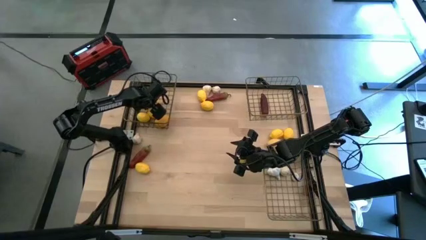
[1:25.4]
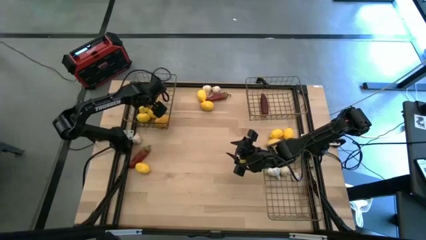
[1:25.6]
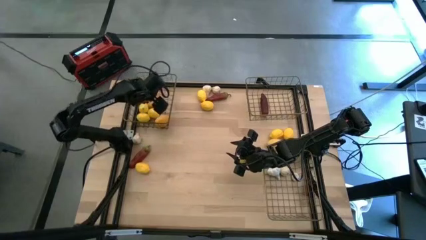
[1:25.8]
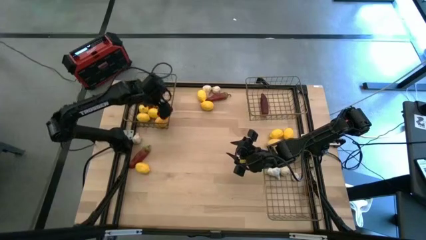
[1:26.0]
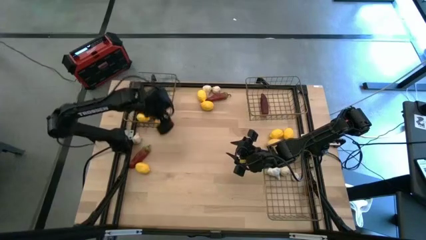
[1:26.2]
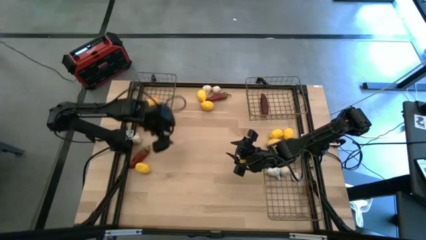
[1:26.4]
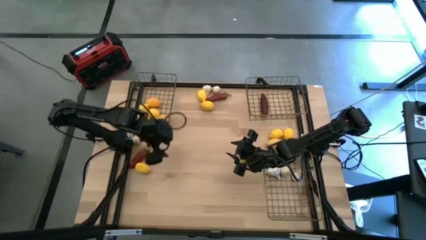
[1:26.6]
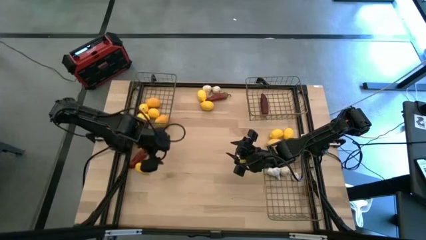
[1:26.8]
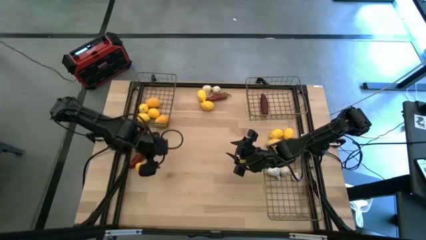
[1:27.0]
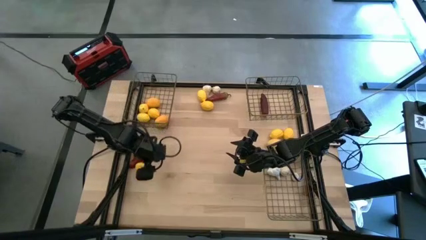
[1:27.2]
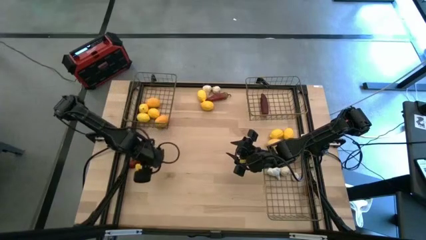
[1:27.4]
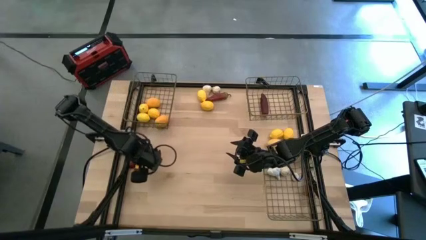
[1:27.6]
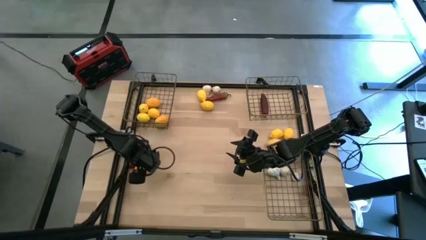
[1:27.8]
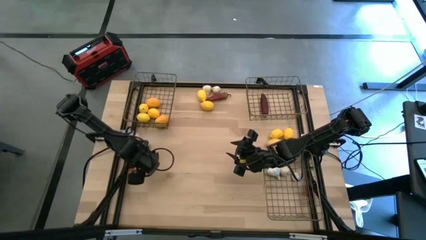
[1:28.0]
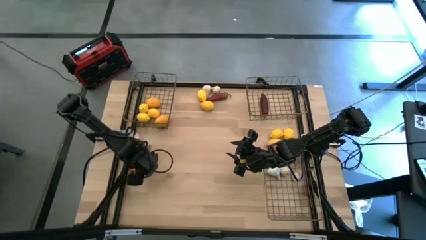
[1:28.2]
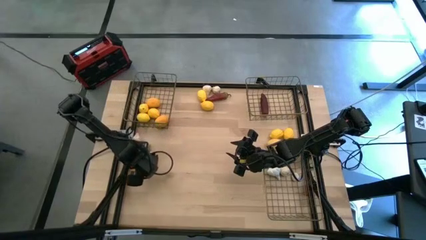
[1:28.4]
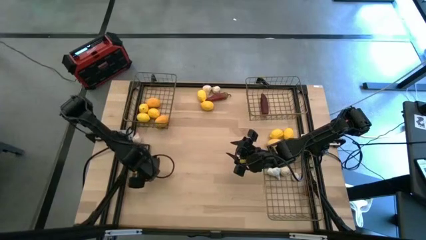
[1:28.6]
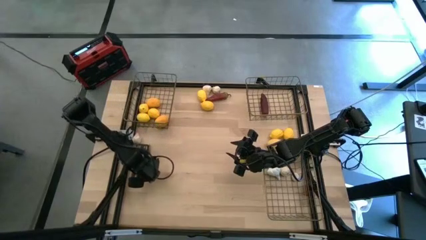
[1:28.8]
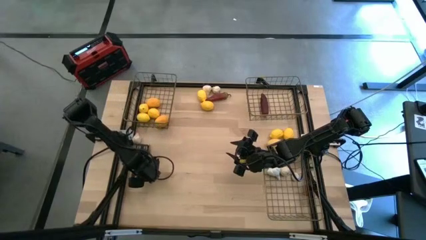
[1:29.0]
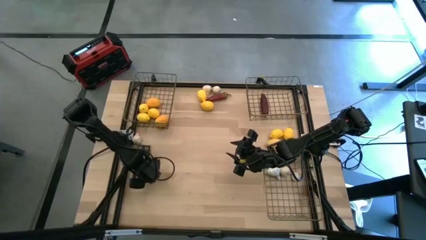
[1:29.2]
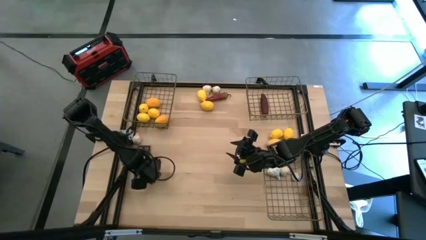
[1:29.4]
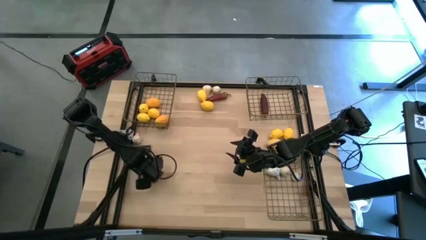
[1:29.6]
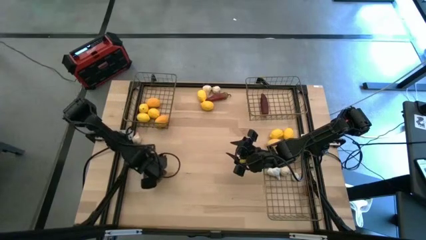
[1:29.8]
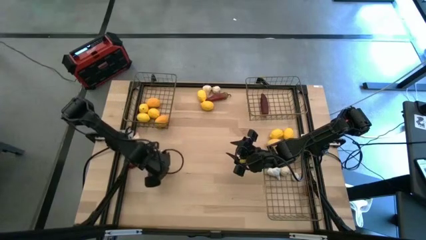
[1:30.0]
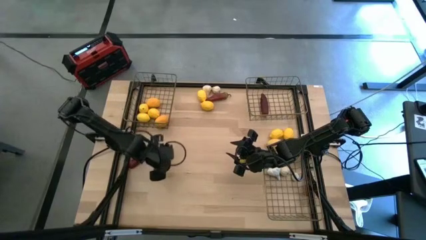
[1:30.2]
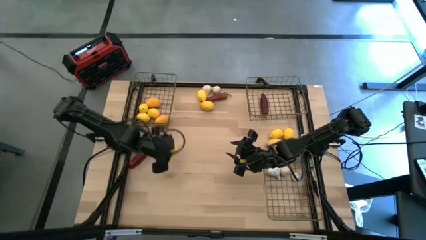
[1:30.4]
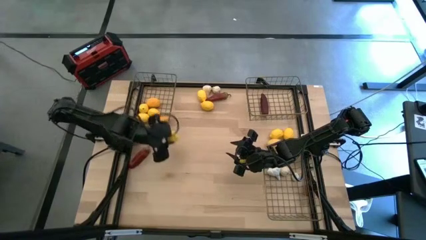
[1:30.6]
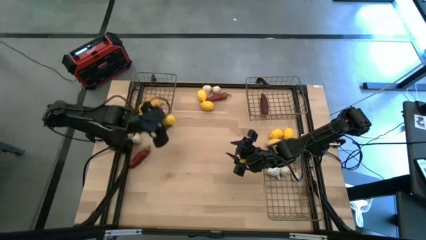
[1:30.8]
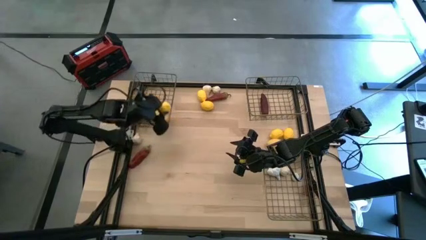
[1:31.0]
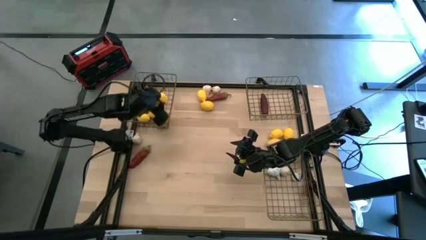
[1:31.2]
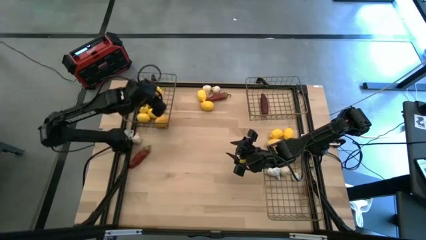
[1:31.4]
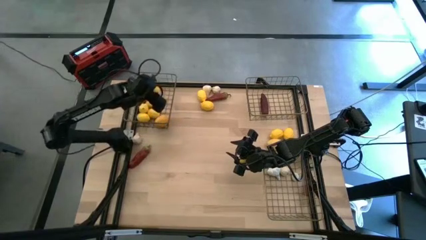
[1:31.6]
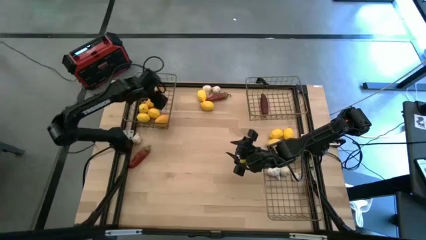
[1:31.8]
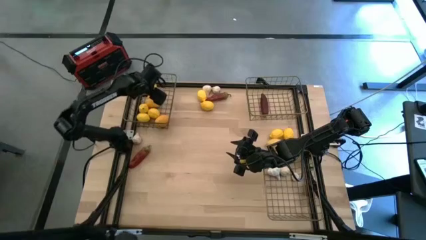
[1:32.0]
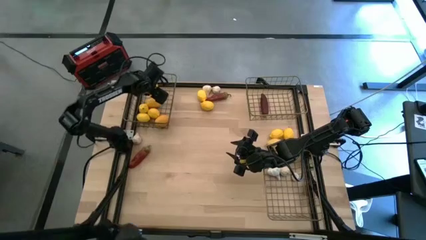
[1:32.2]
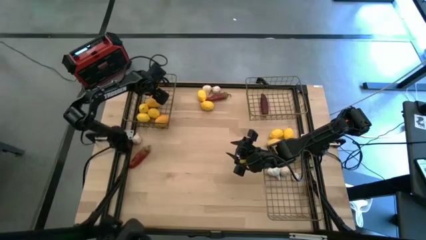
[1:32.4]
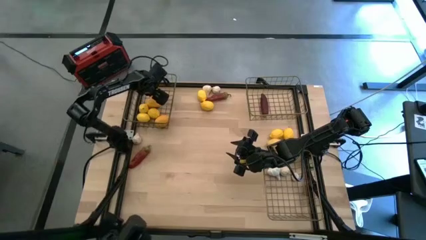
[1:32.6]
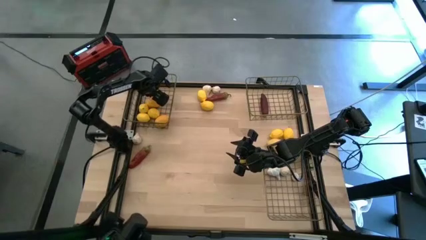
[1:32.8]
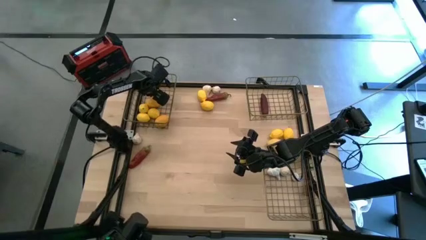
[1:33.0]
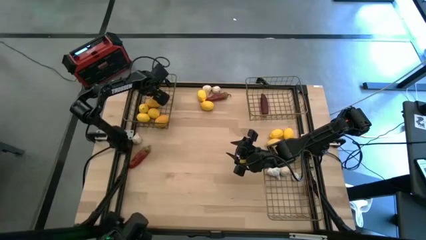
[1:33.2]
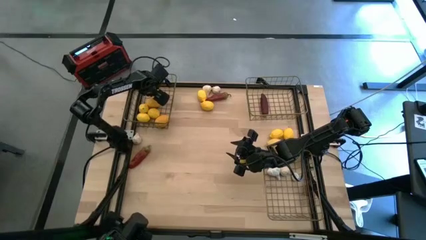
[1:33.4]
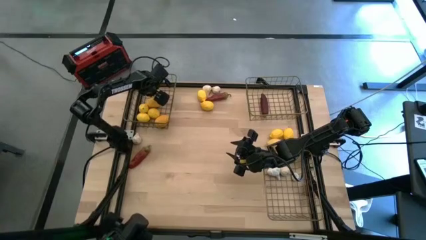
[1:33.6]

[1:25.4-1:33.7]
Task: Sort produce into baskets
Put the yellow lemon into the top left wire basket

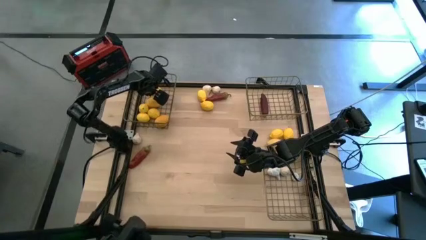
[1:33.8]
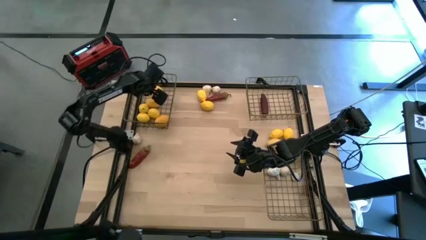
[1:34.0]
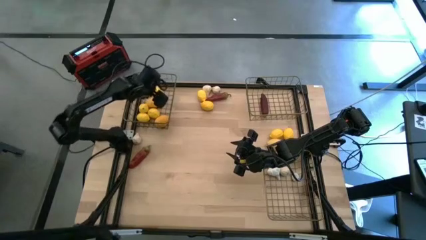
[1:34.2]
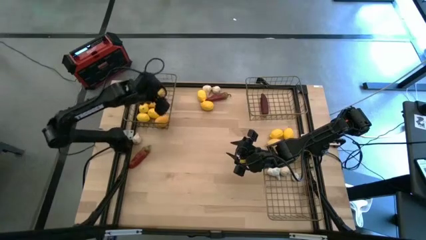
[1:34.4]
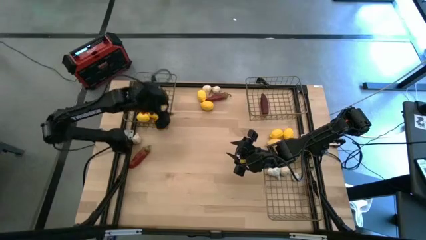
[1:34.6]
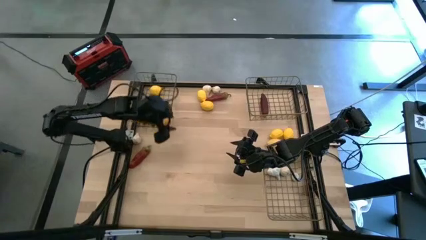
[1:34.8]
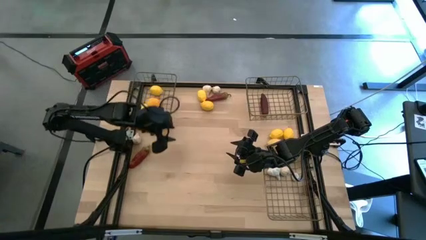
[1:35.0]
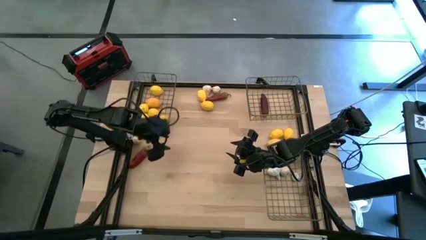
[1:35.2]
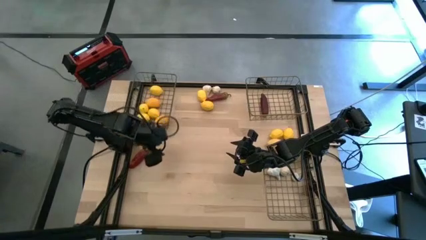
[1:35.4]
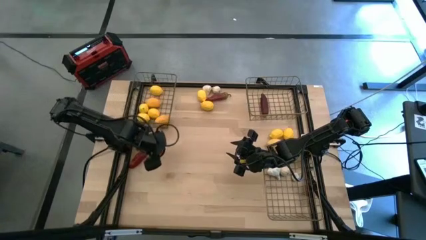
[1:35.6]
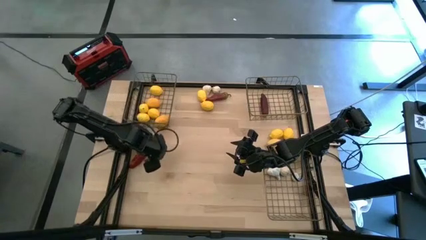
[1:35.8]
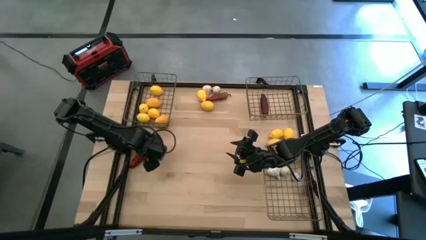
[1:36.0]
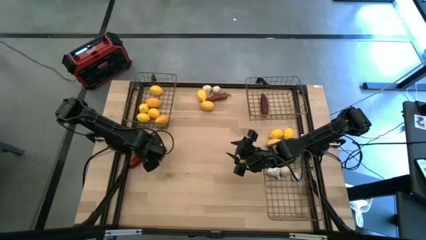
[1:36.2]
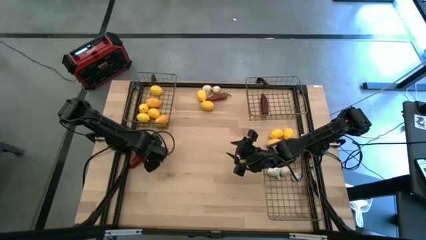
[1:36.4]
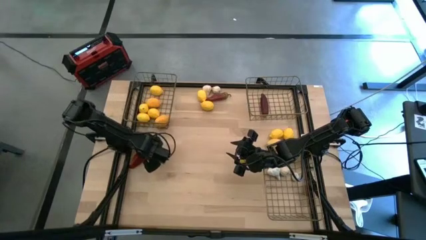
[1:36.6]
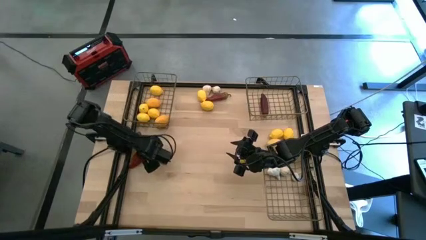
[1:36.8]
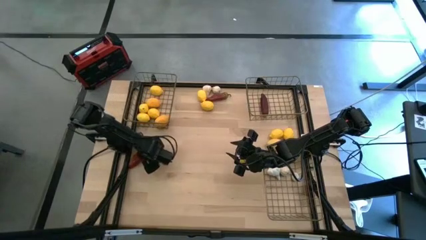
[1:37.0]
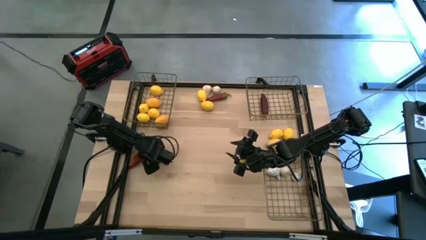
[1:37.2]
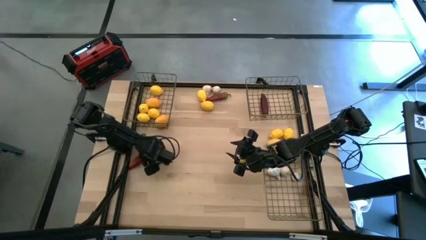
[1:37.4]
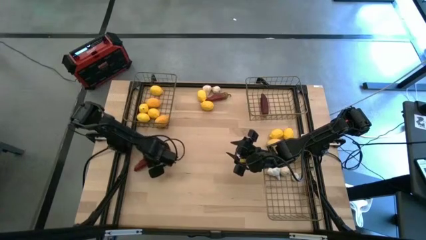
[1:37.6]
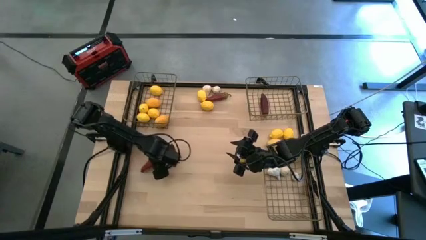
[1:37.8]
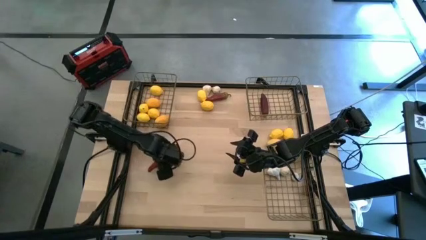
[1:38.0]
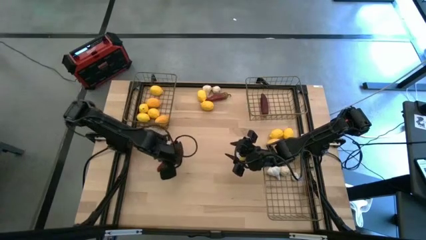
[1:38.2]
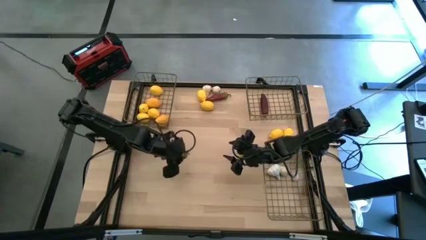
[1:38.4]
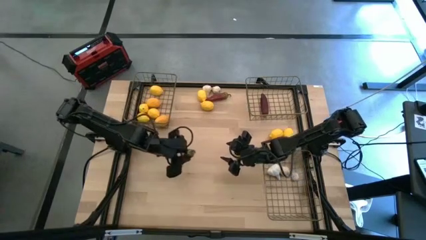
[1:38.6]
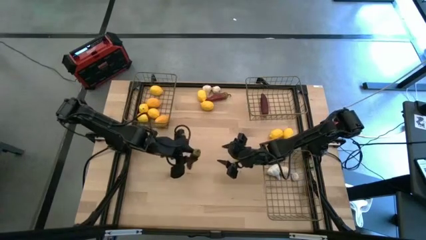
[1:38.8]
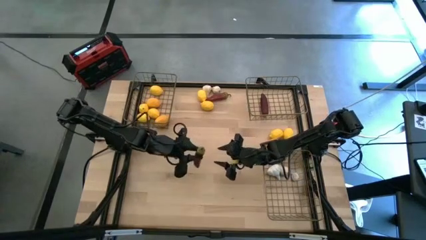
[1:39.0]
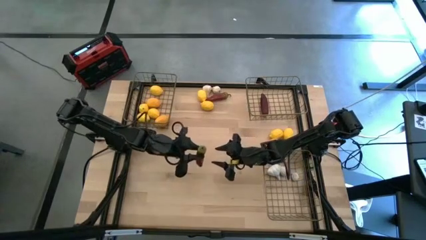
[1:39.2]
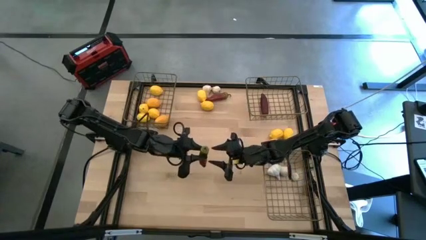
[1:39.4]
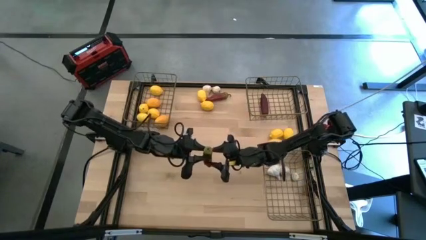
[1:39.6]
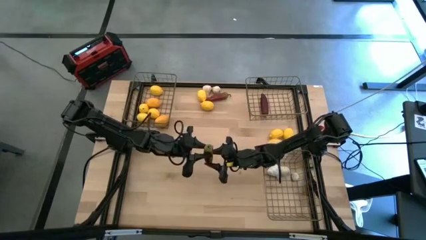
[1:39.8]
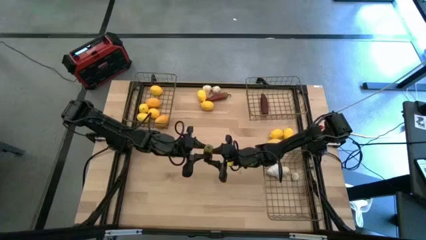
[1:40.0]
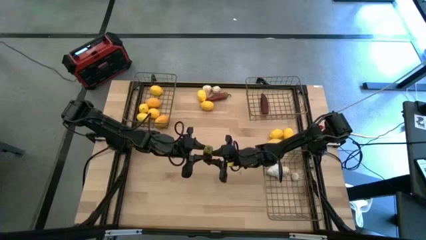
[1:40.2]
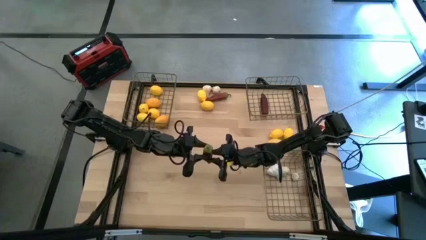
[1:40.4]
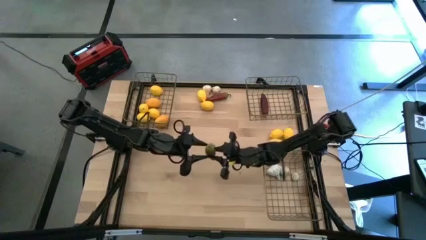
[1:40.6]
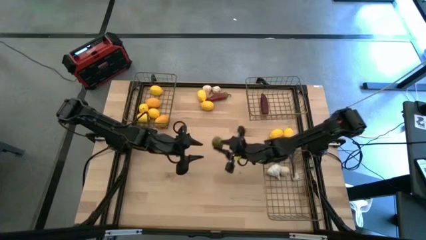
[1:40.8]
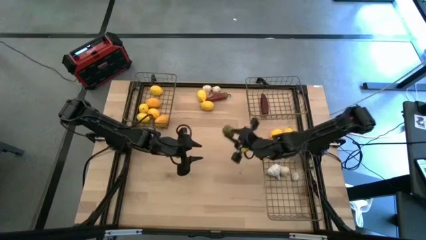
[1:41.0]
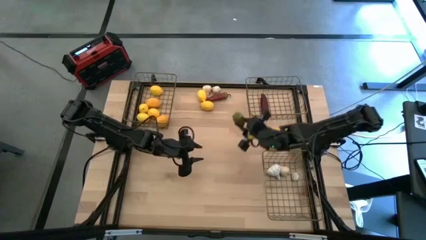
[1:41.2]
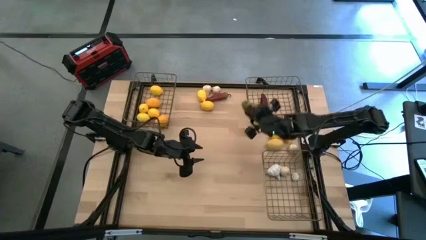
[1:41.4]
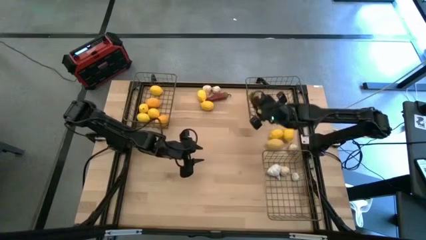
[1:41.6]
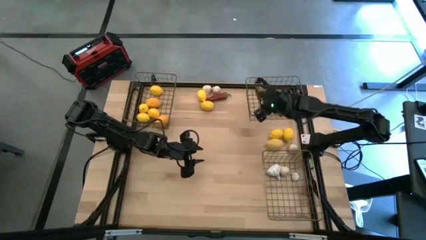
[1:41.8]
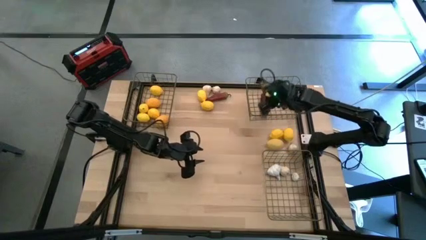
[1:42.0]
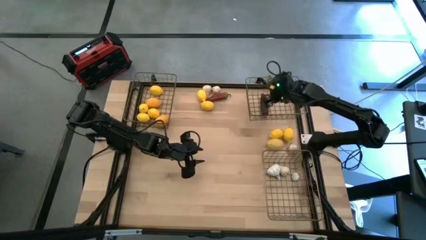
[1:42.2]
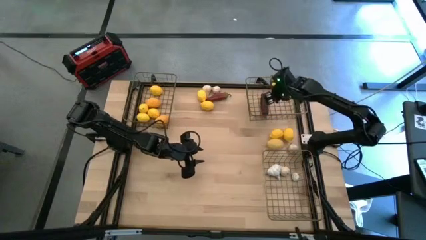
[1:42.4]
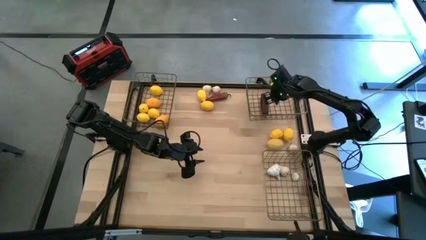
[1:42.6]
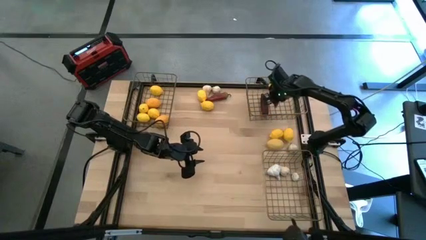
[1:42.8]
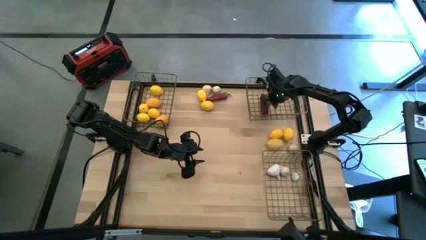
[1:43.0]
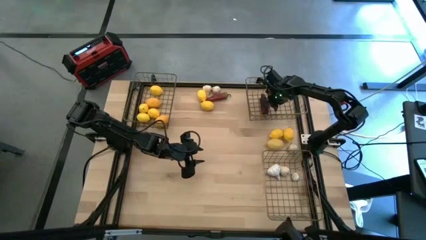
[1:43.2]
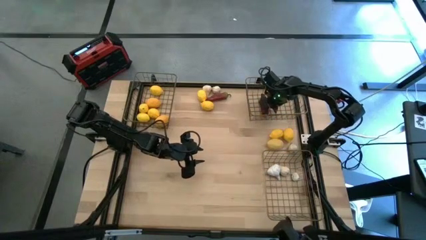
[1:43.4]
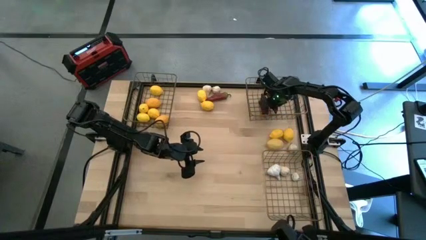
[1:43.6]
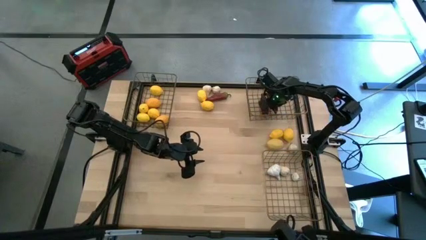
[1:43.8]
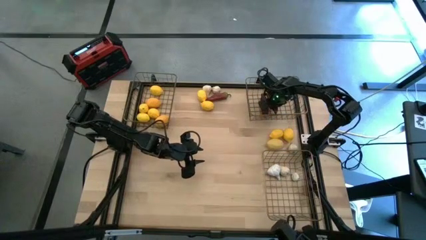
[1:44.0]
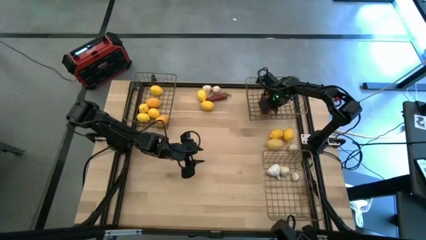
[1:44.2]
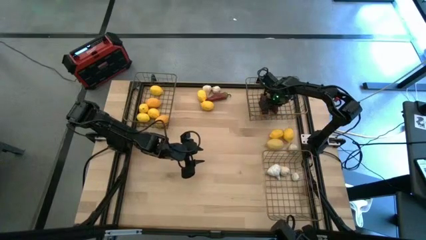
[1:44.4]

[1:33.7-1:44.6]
Put the red chili pepper into the top right wire basket
